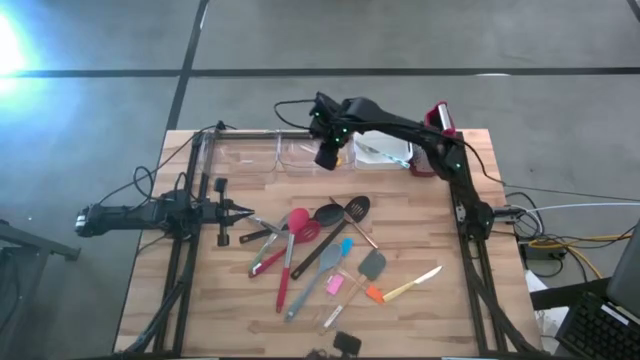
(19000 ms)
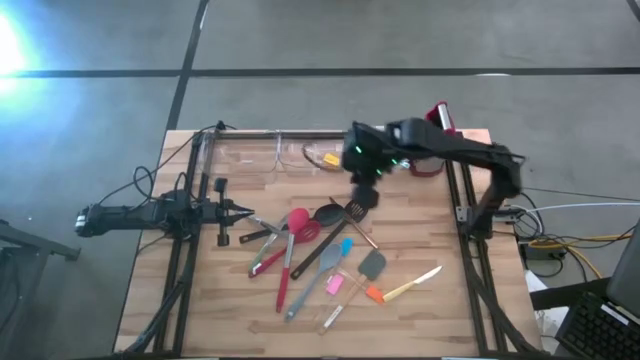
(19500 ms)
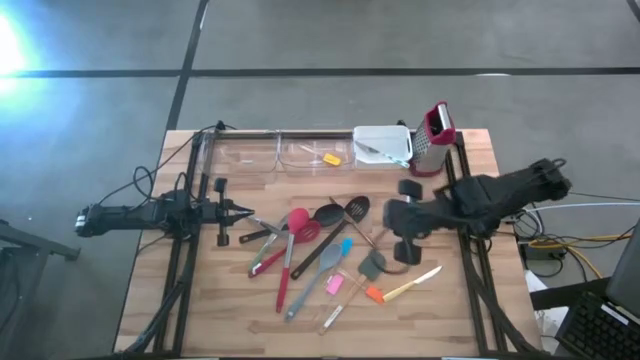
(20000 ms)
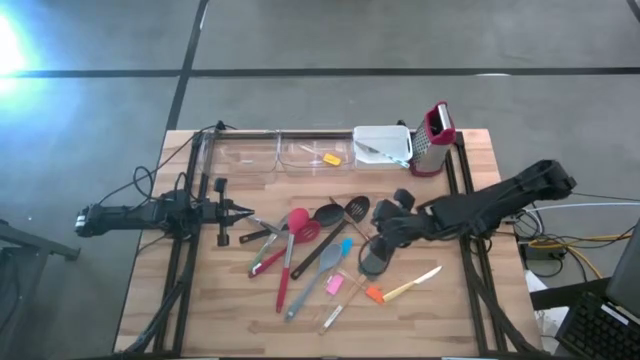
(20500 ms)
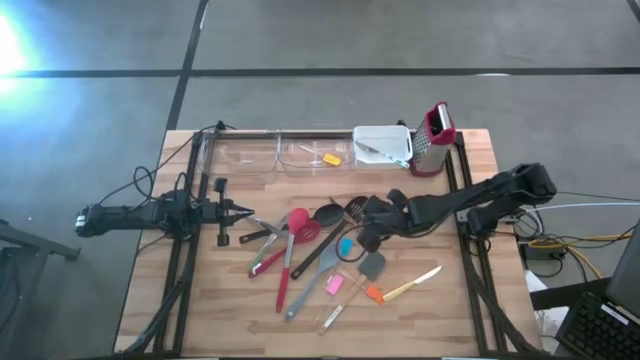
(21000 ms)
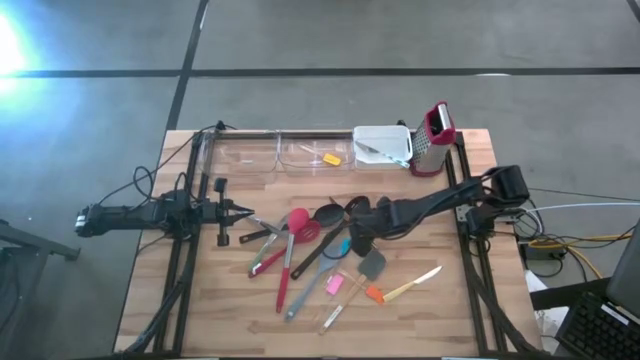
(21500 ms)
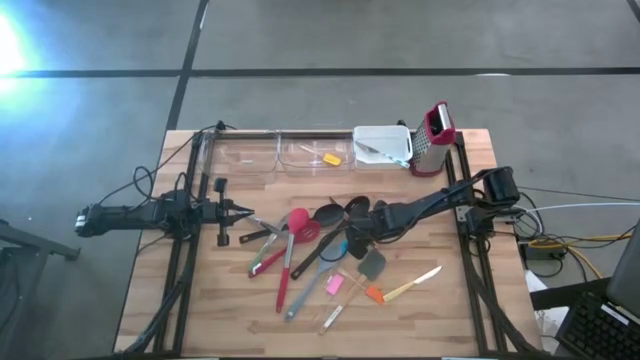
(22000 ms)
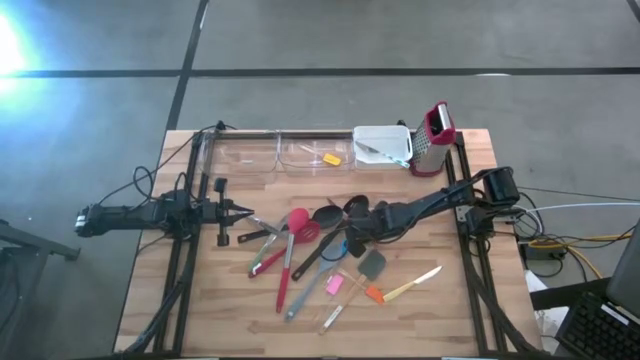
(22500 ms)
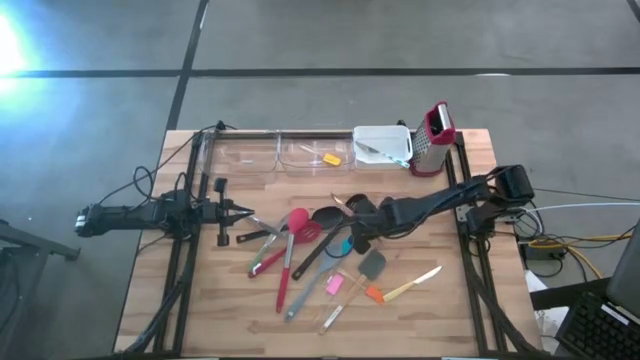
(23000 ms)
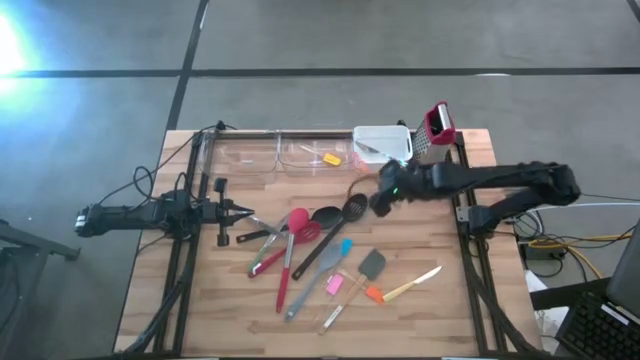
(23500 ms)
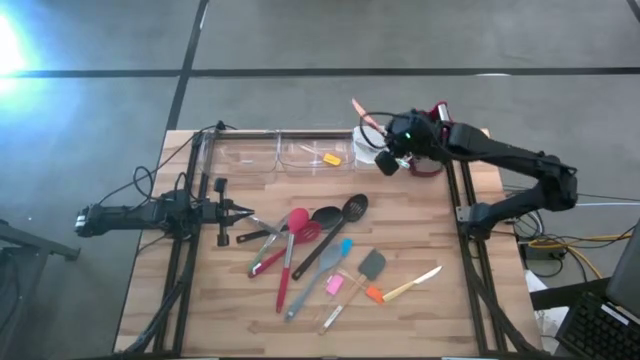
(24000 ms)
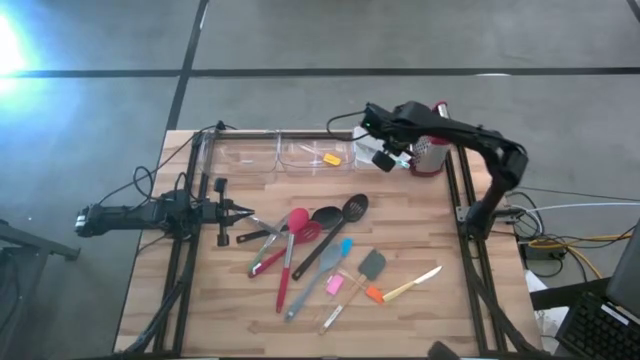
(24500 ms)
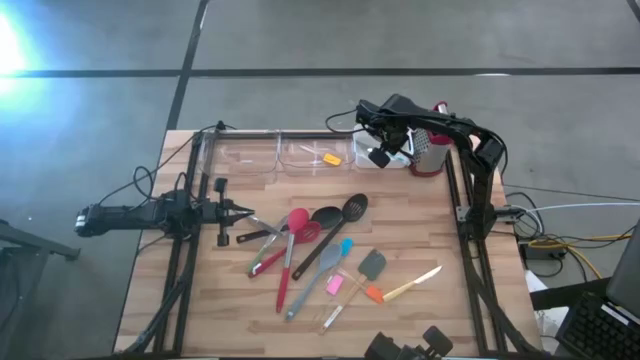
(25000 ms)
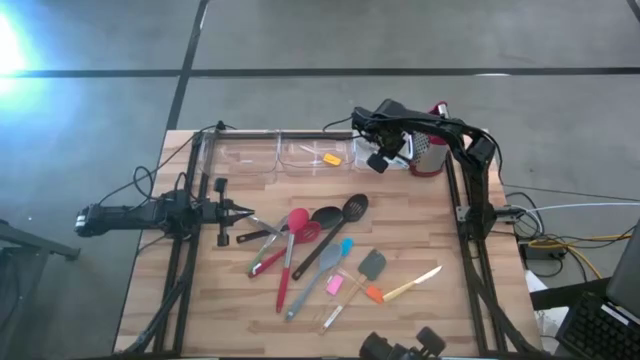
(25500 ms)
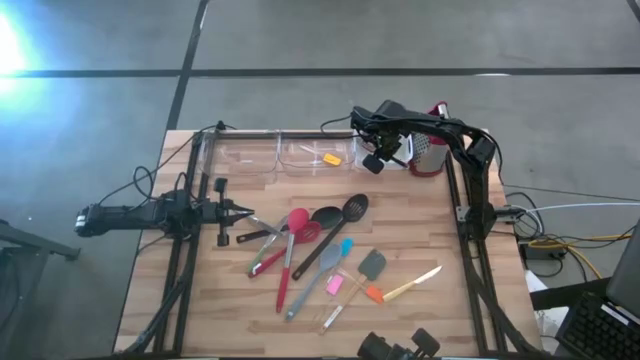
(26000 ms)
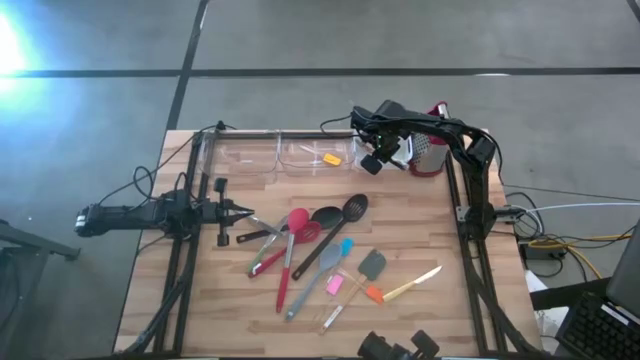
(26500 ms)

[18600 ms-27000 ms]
Task: Pick & Place Kitchen Items
Put the gold table knife into the white bin

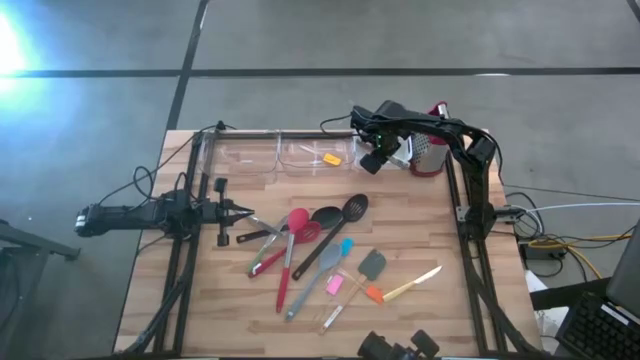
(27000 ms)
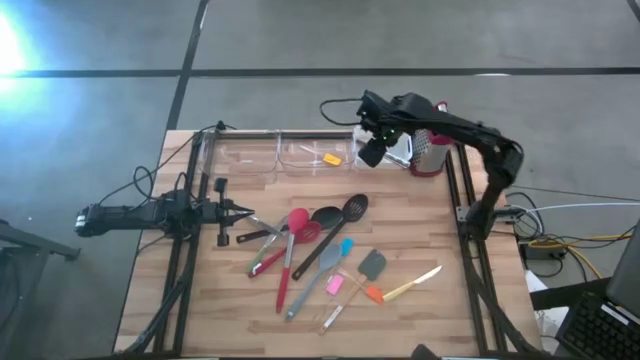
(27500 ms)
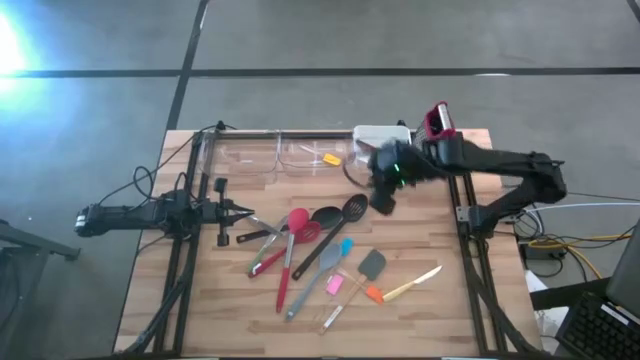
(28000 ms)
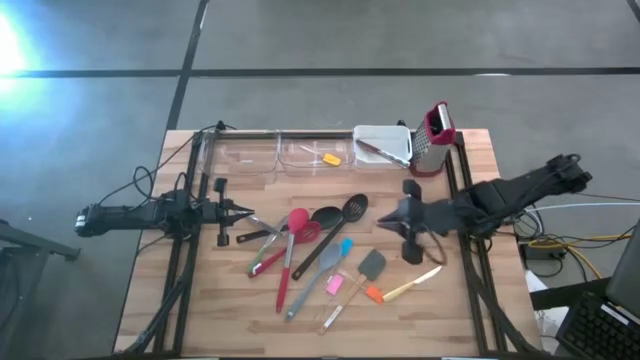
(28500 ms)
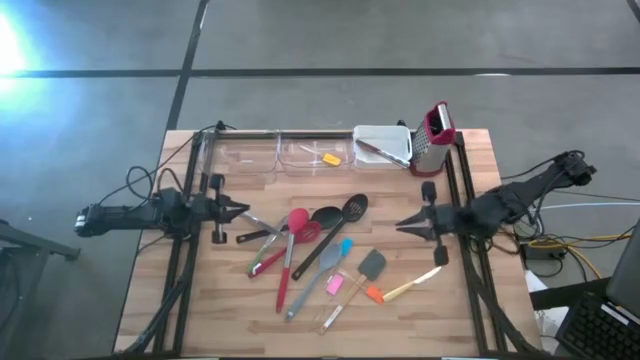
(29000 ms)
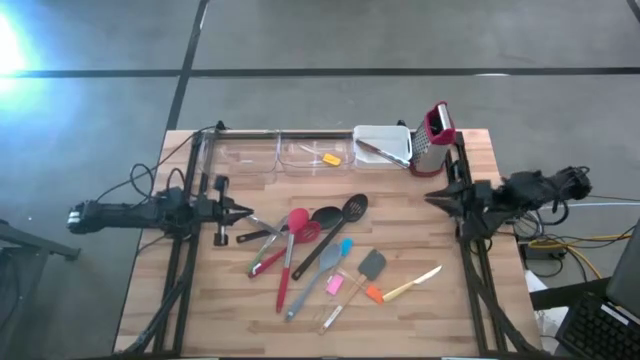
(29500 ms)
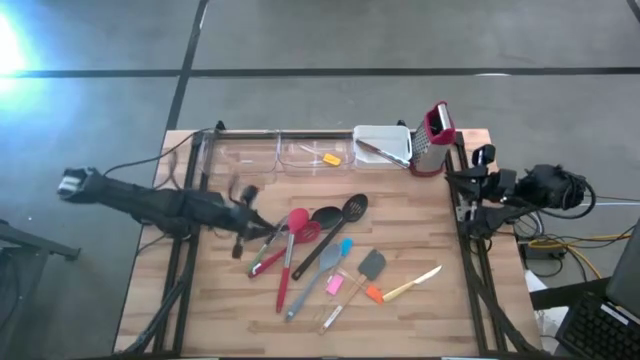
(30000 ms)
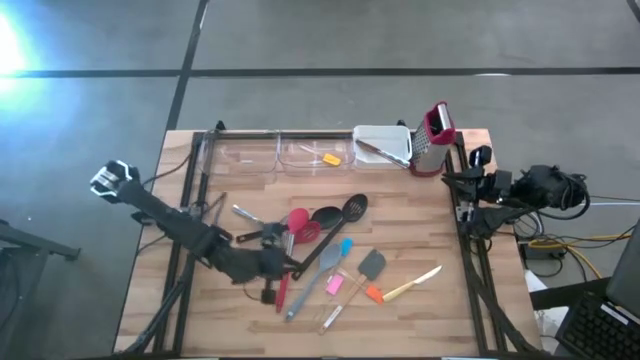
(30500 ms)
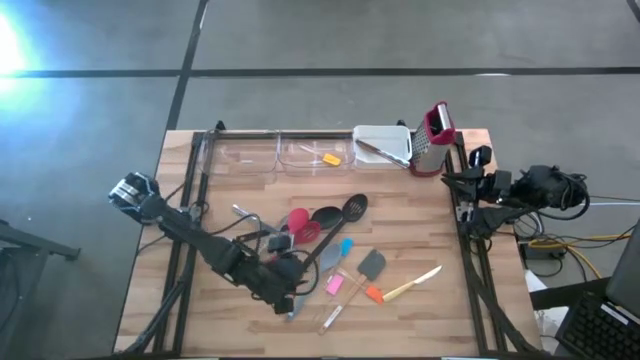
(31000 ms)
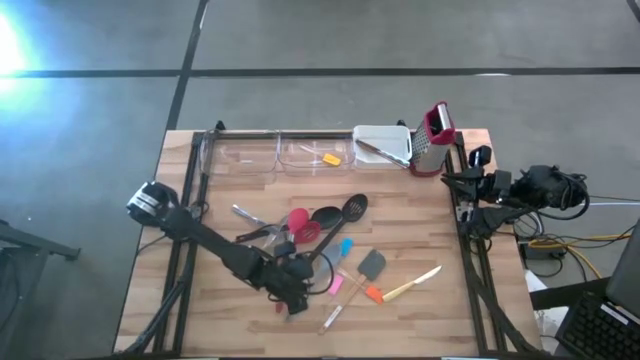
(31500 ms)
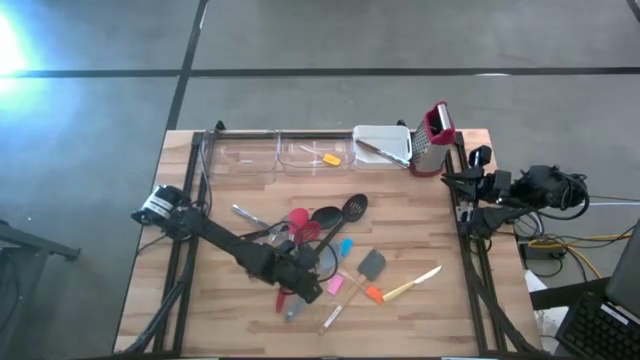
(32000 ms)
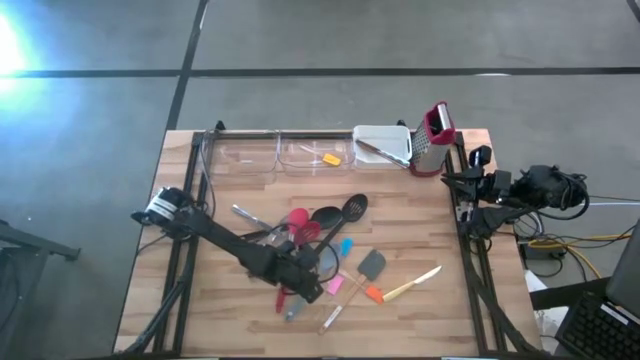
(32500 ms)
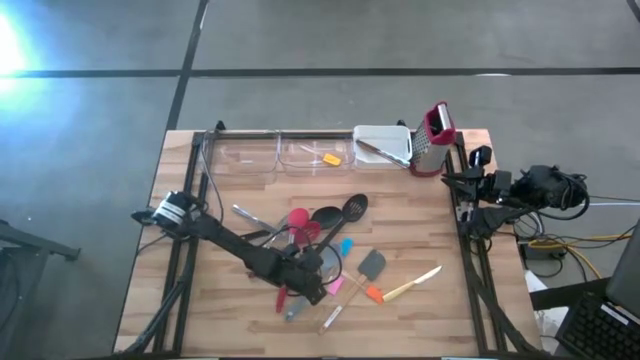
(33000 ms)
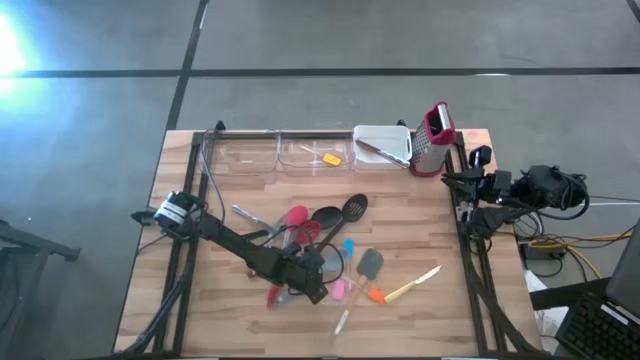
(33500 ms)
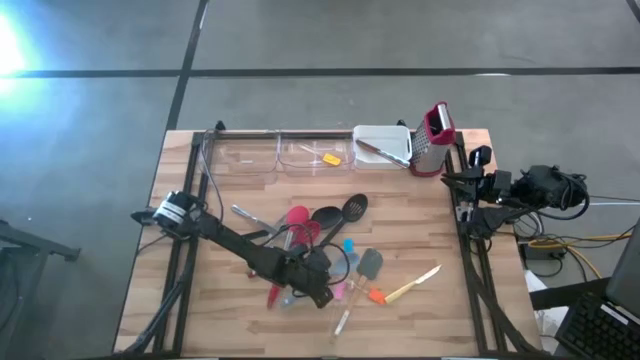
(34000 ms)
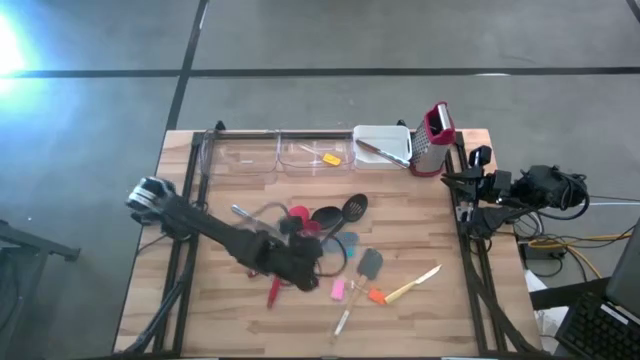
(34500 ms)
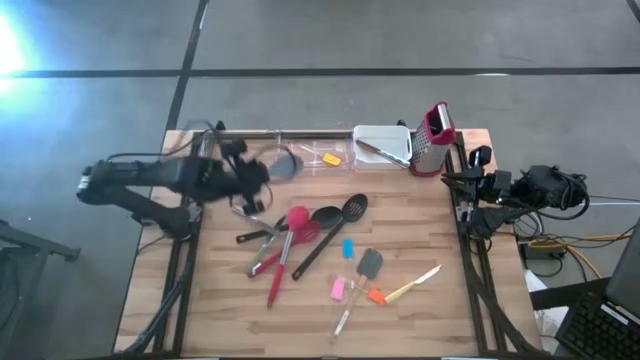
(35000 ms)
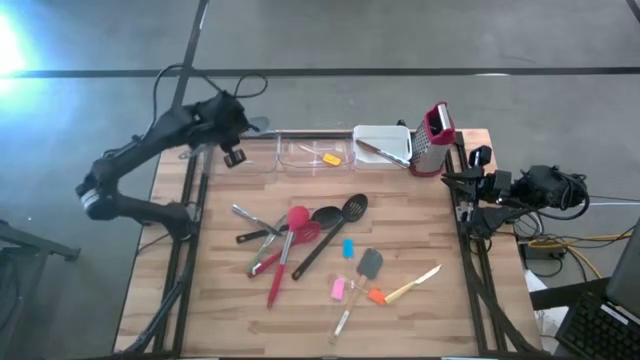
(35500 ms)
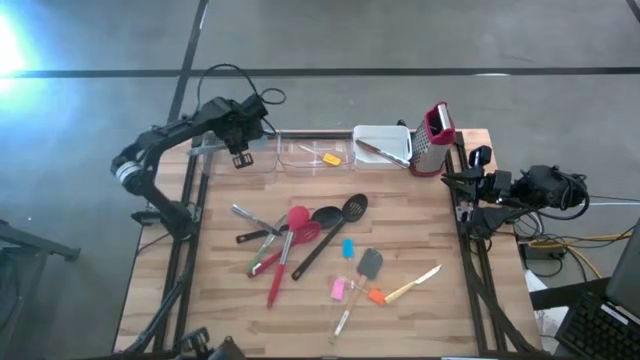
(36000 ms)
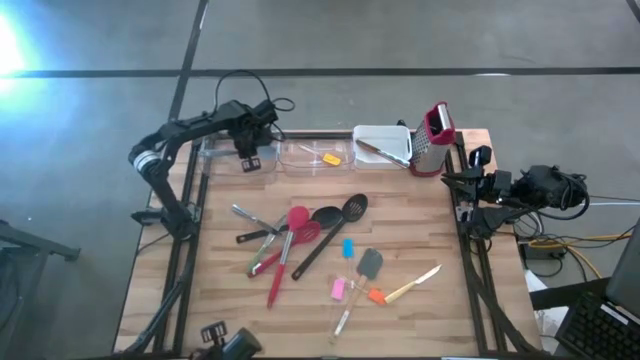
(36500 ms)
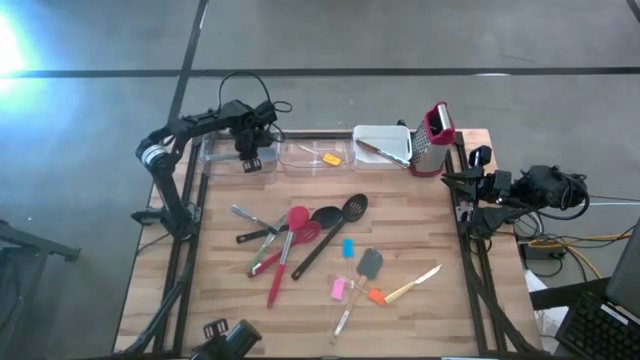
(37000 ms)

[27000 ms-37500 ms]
Put the blue serving spoon into the left transparent bin

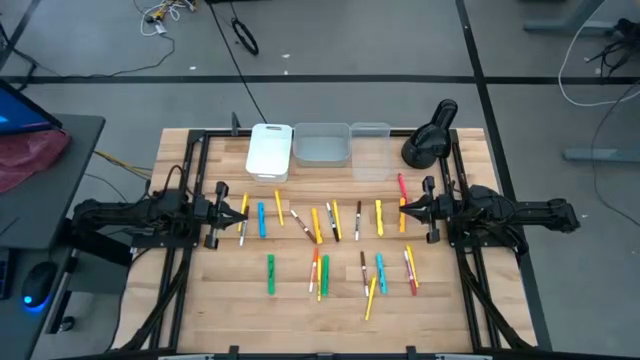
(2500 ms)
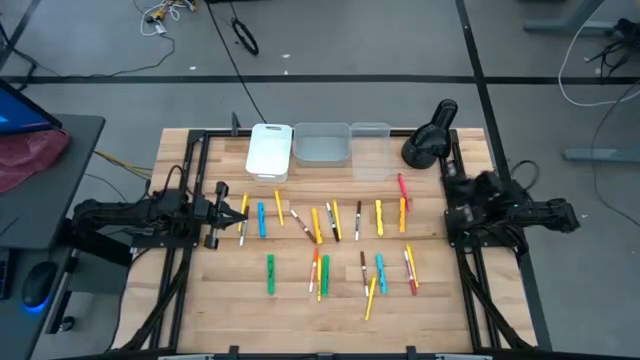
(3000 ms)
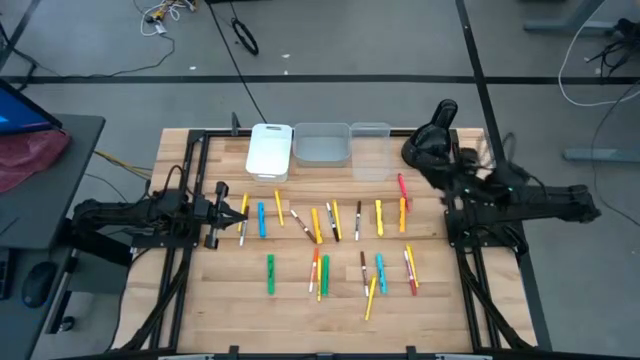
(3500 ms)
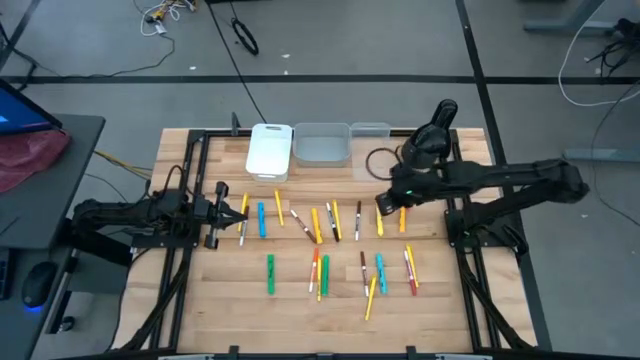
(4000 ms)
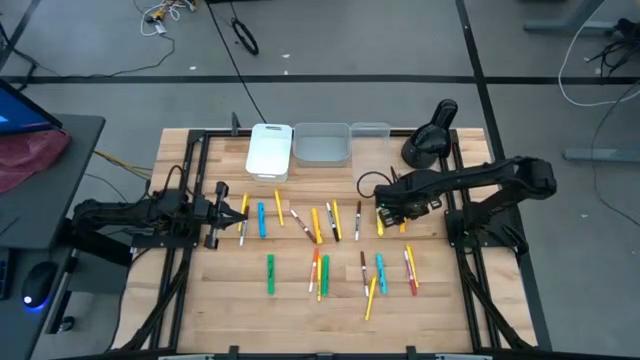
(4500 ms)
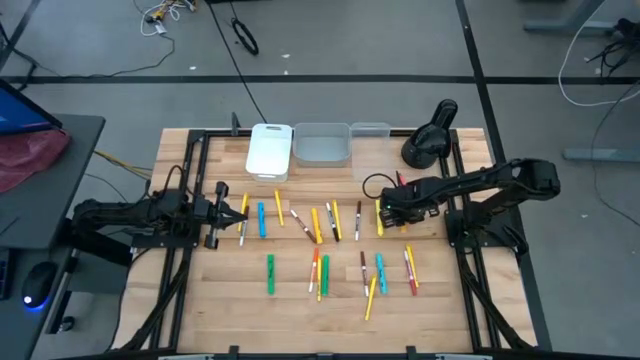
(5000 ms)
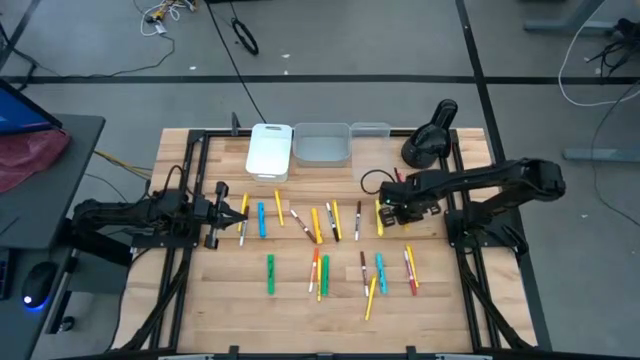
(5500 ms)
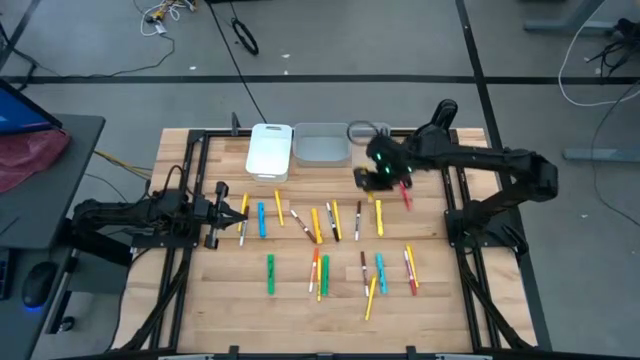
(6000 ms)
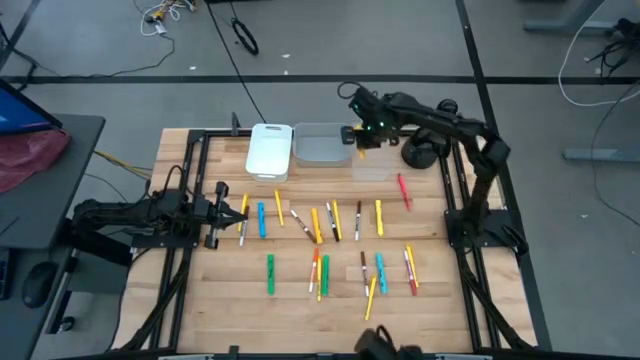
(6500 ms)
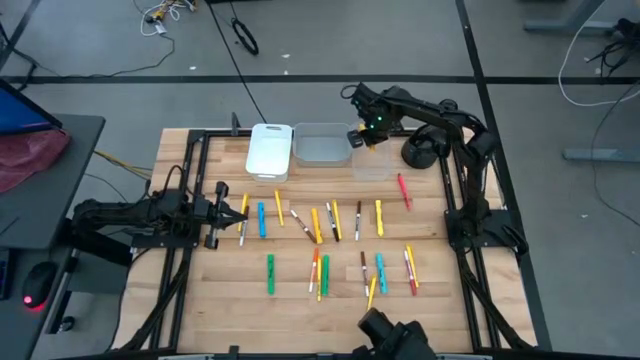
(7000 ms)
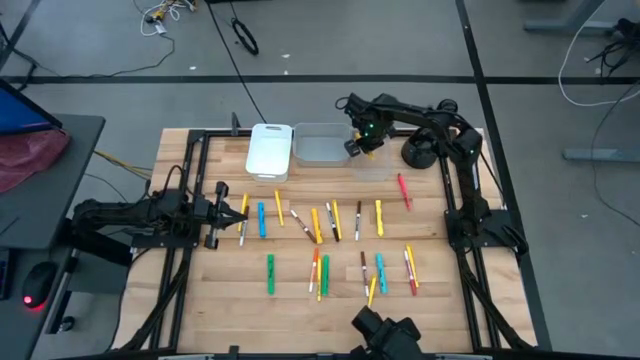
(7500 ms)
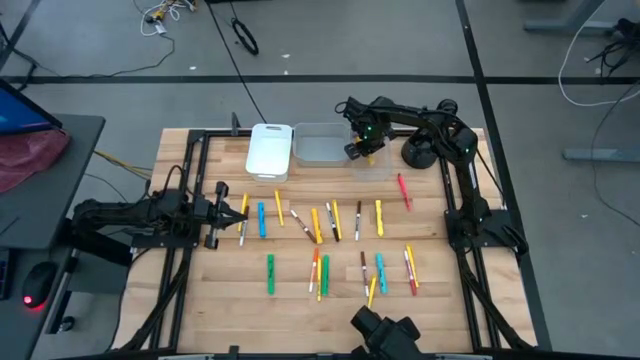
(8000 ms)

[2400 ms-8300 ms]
Task: Pick & Place Markers
Put the yellow highlighter pen into the transparent bin
